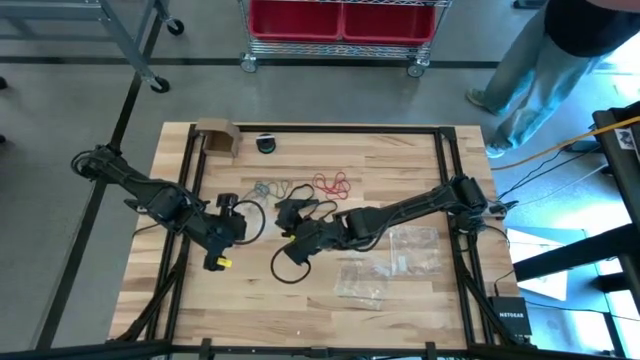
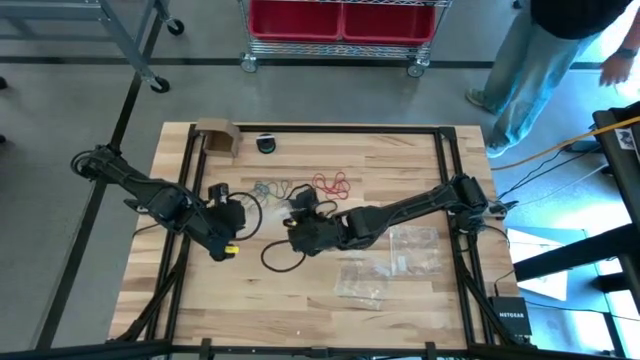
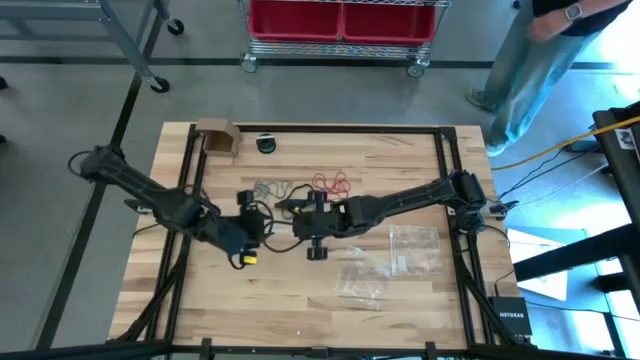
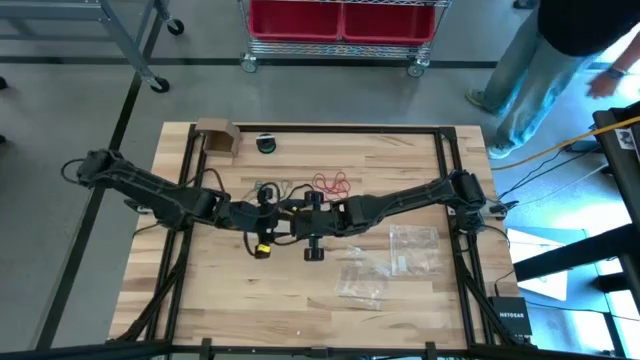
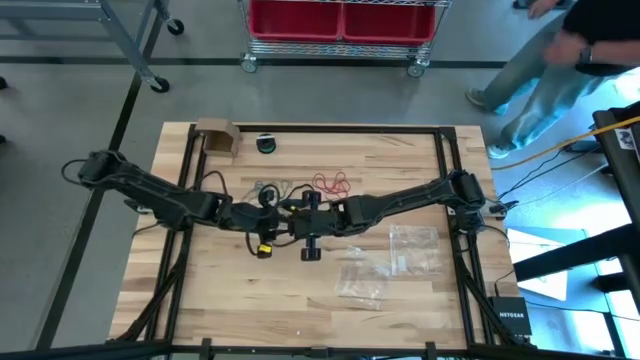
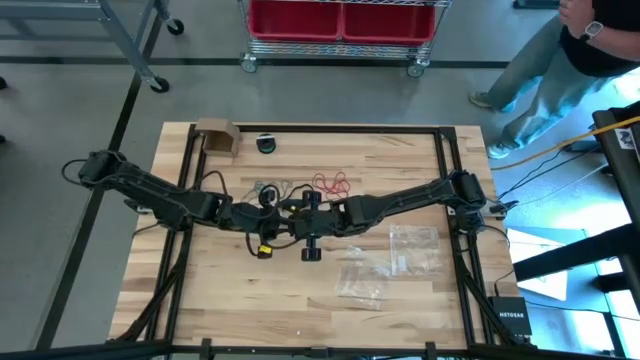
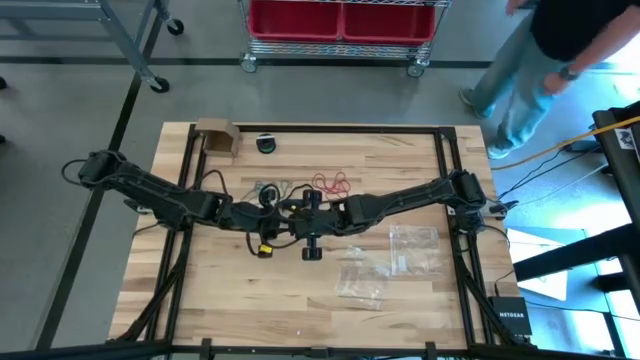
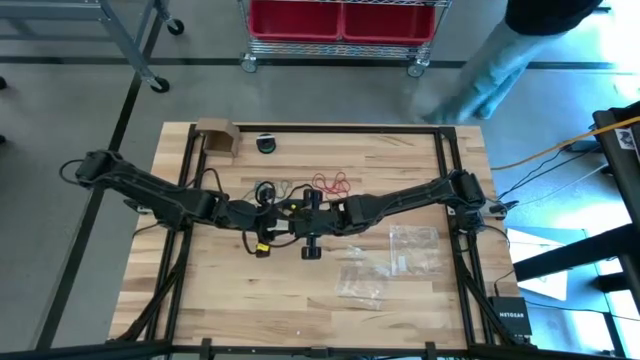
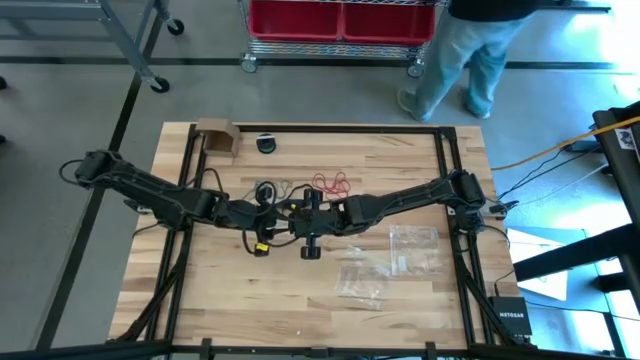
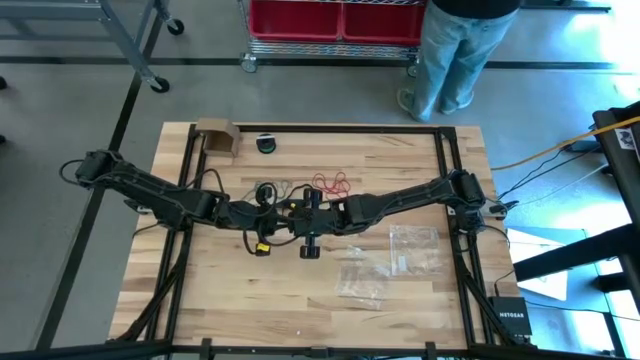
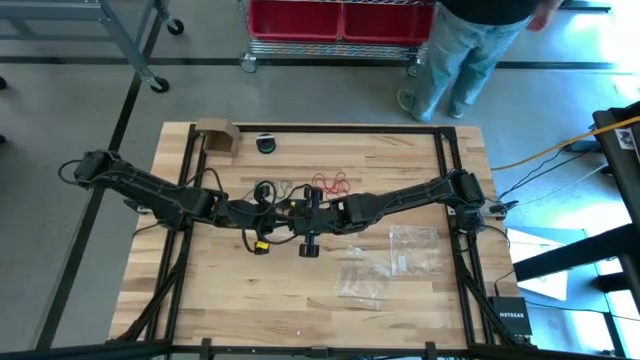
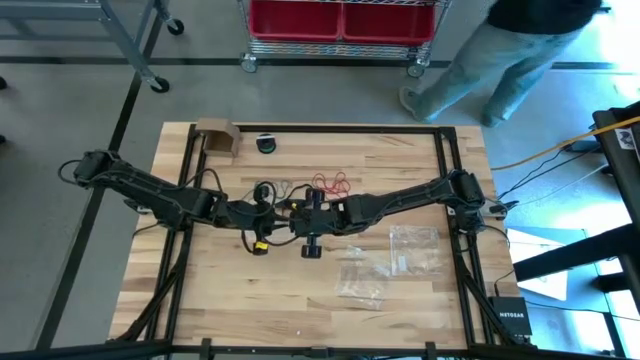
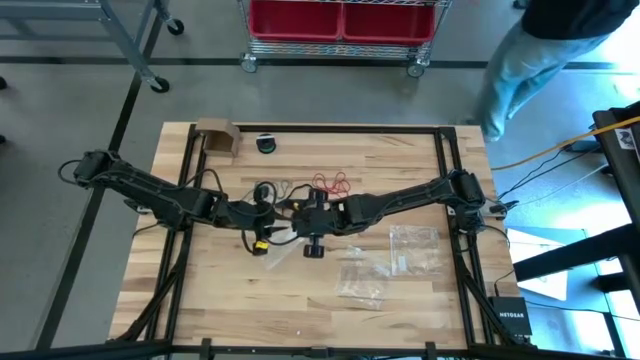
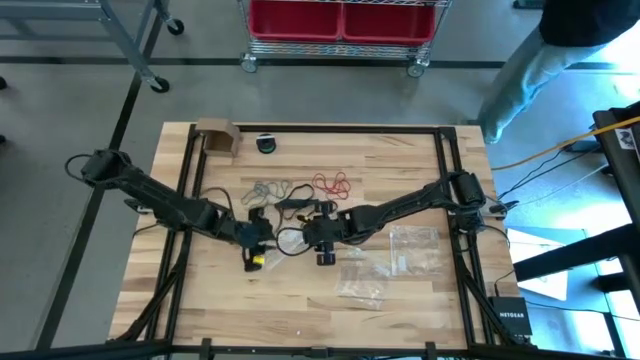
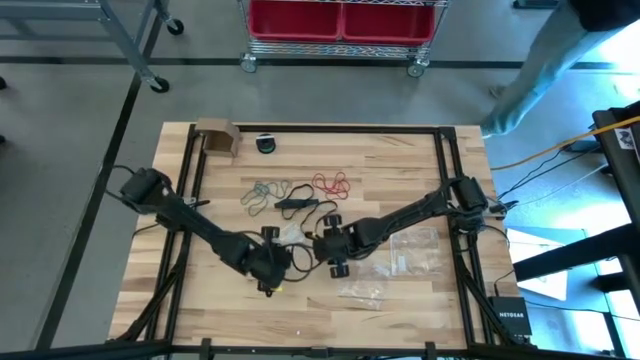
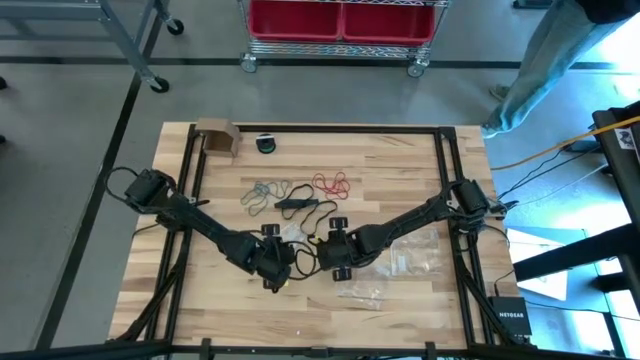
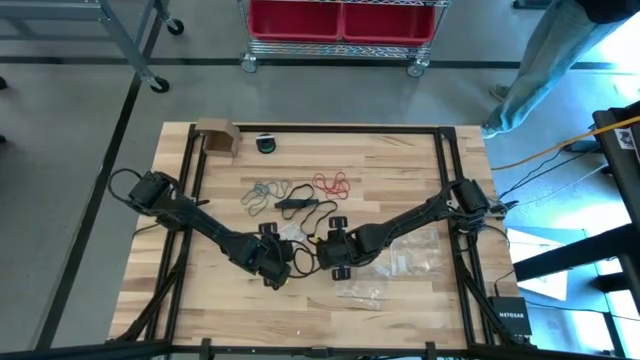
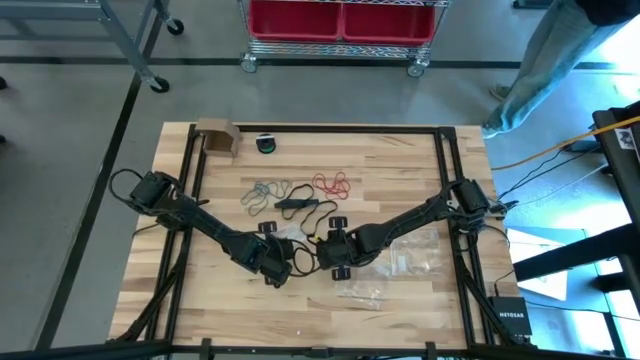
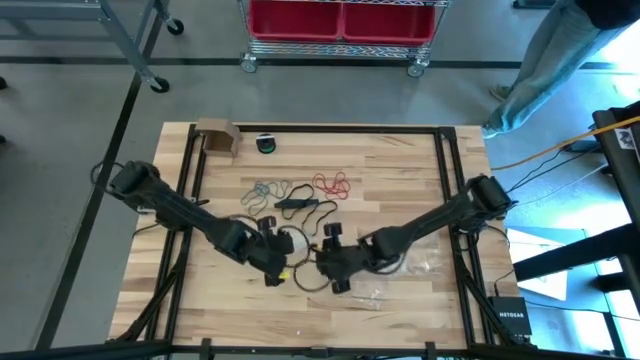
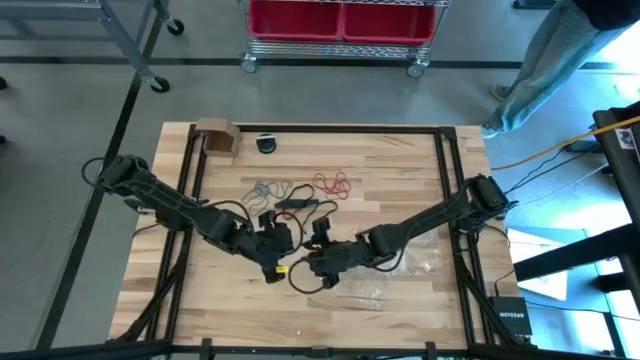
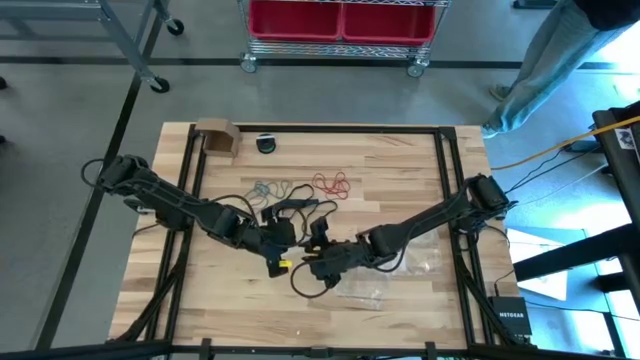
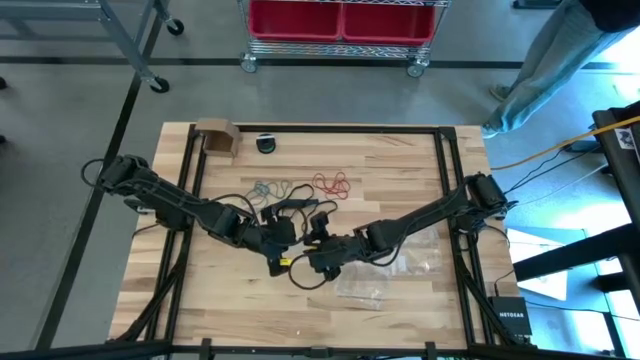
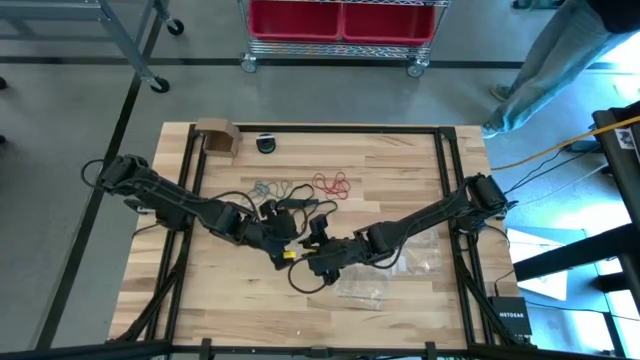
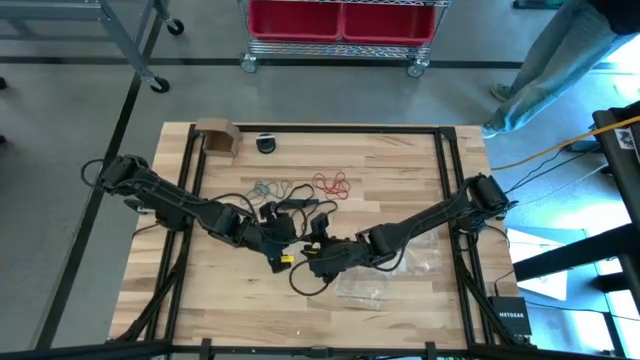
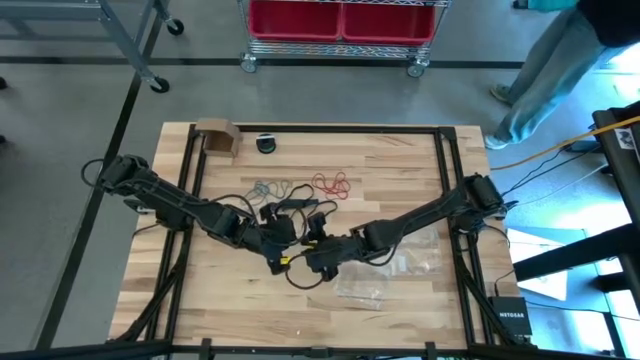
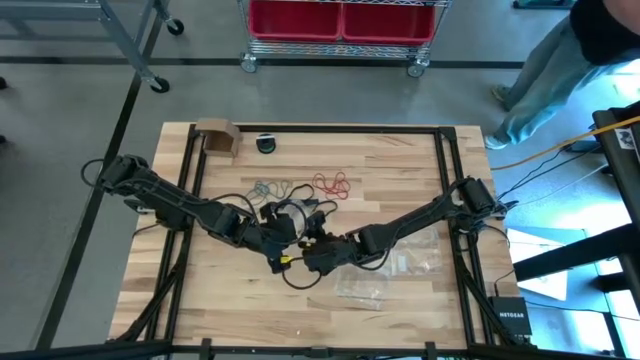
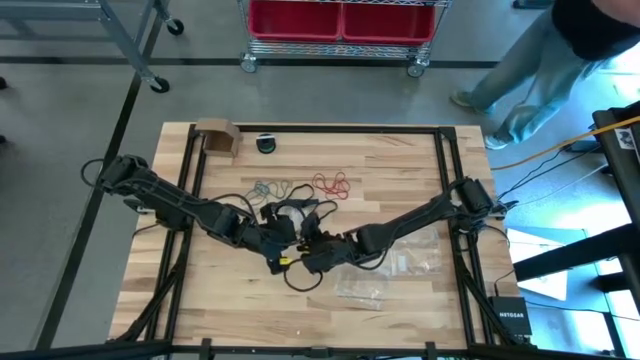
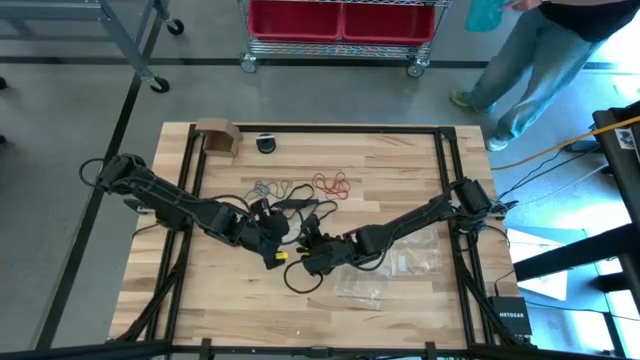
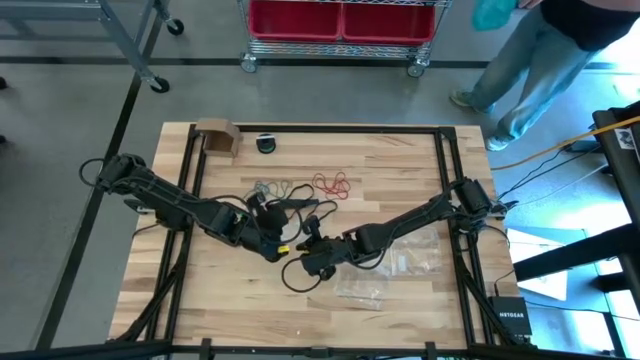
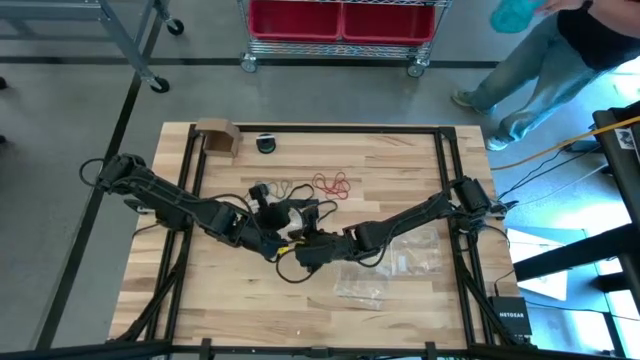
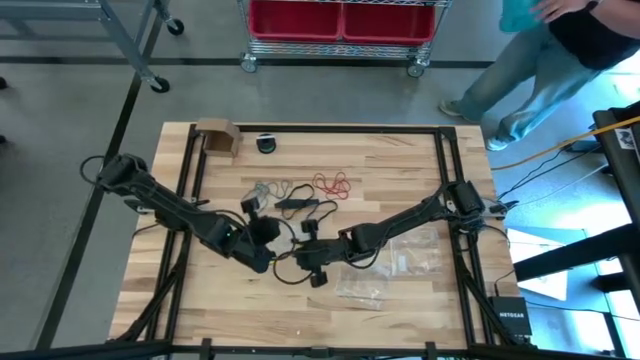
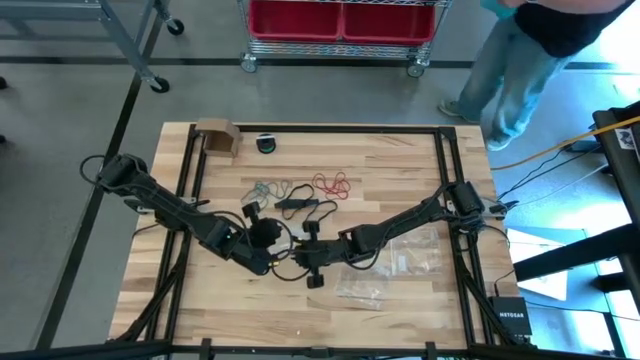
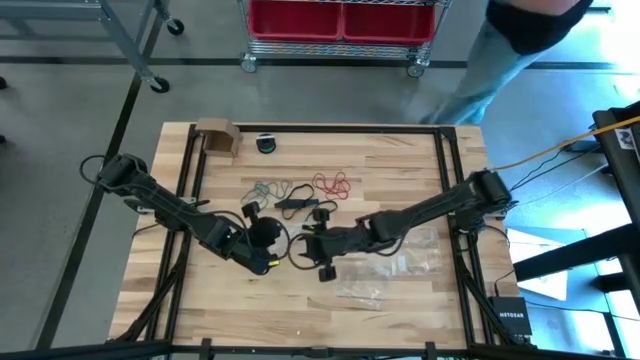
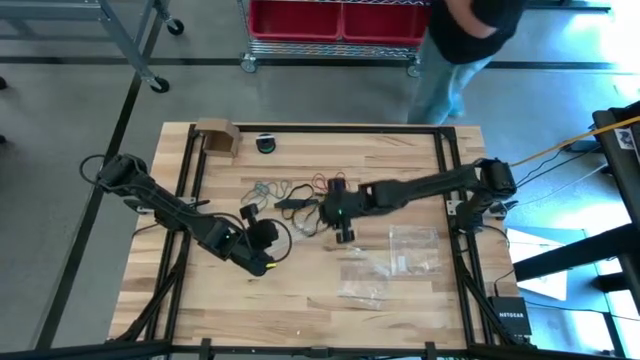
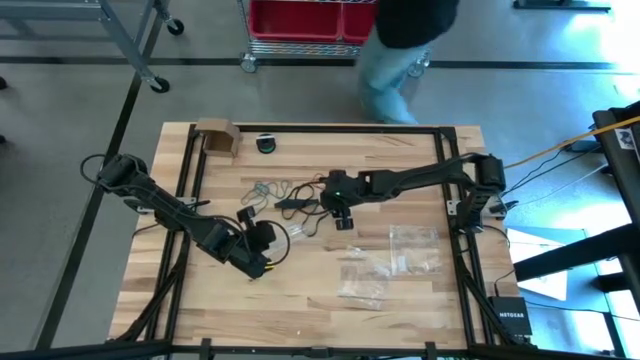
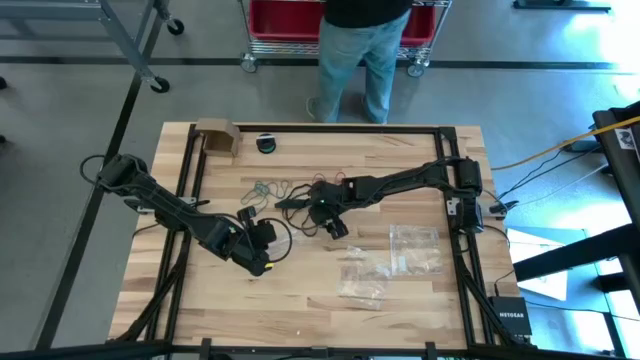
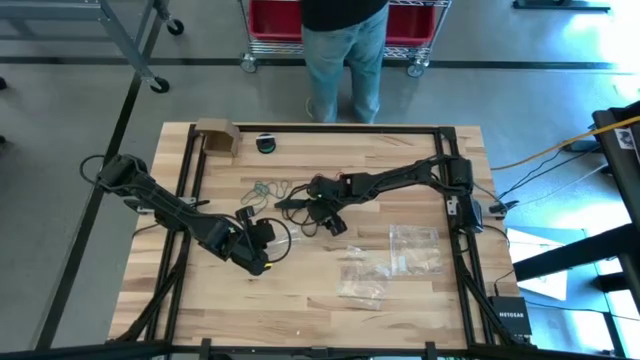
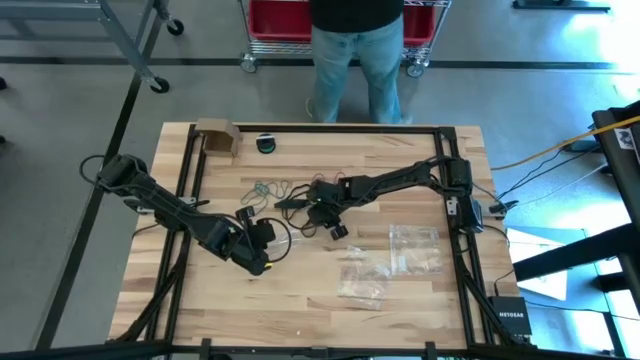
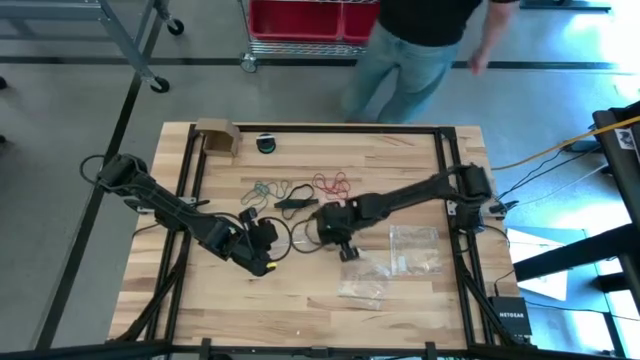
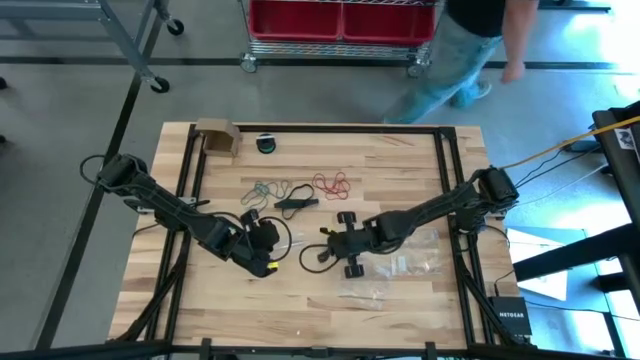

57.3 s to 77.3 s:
Task: Sort rubber bands
Put the black rubber band into the transparent zip bag

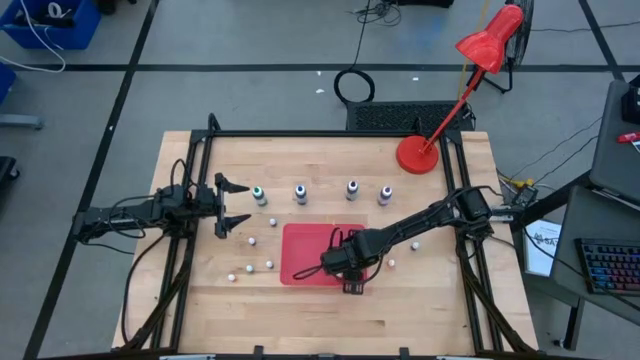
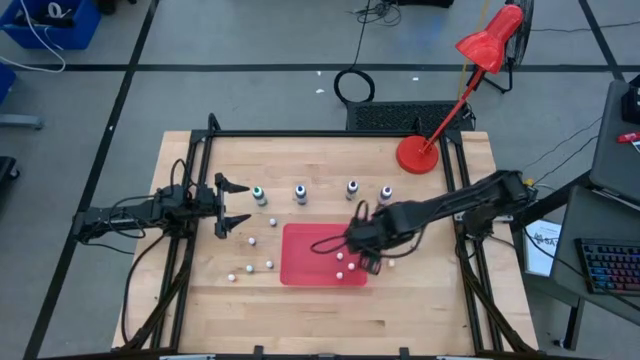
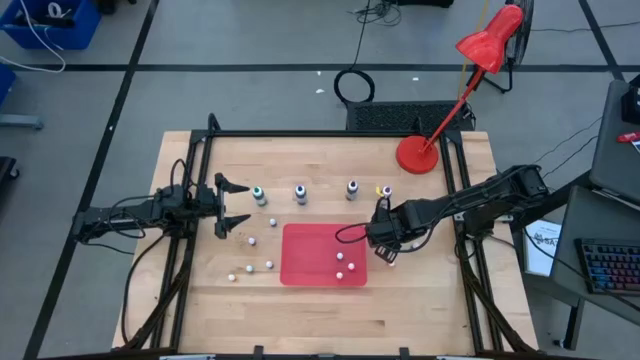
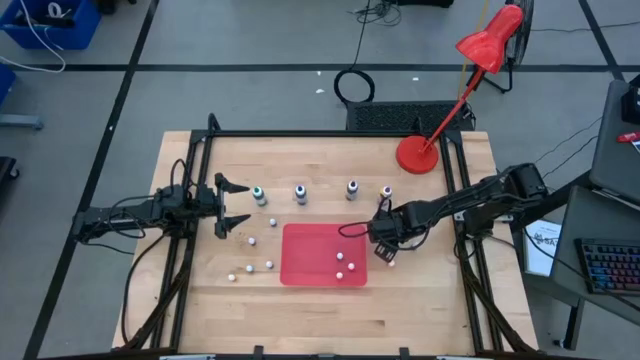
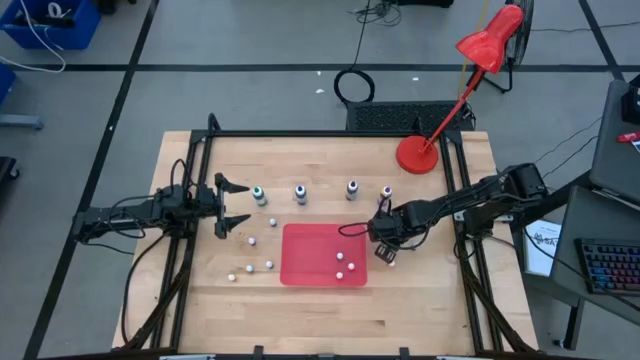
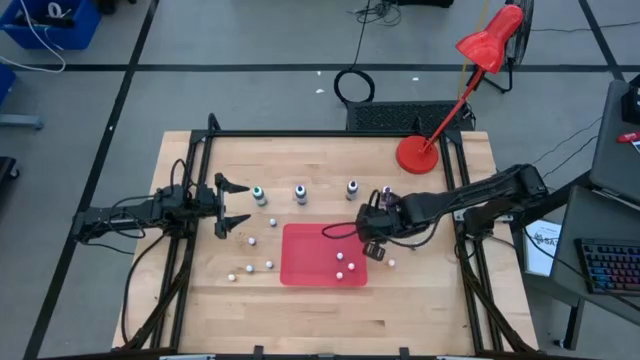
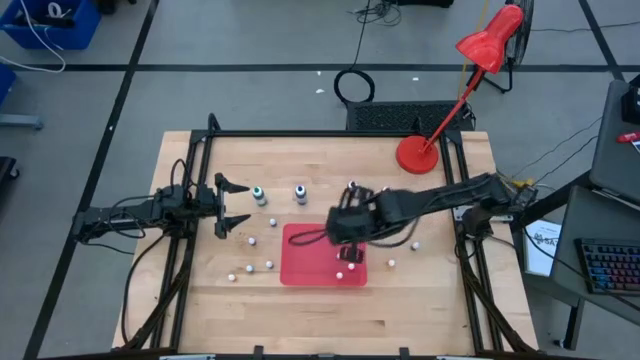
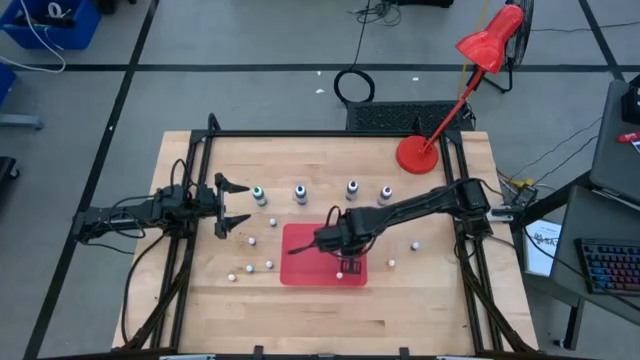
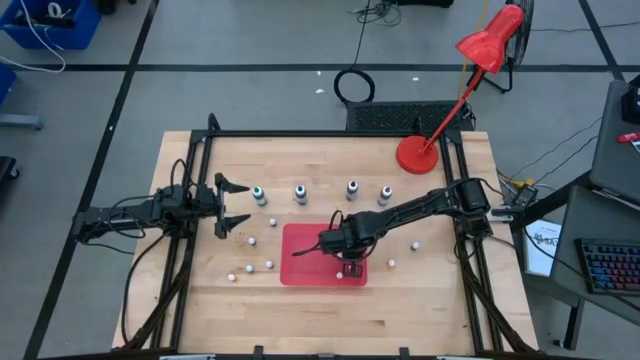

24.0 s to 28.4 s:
Task: Pick & Place food coloring
Put the small red food coloring bottle into the pink bin
